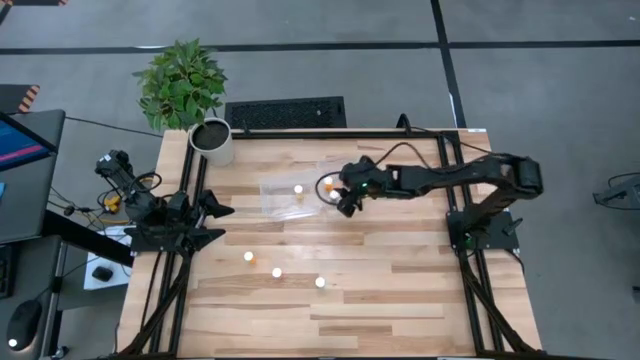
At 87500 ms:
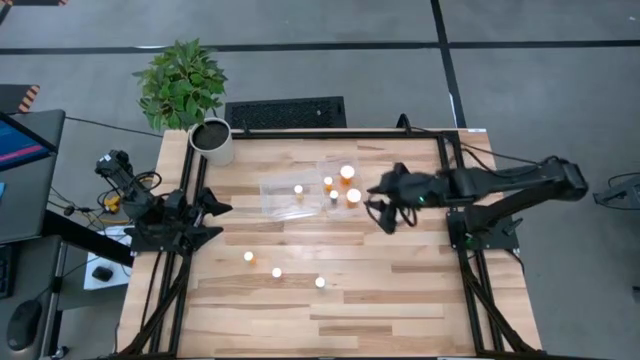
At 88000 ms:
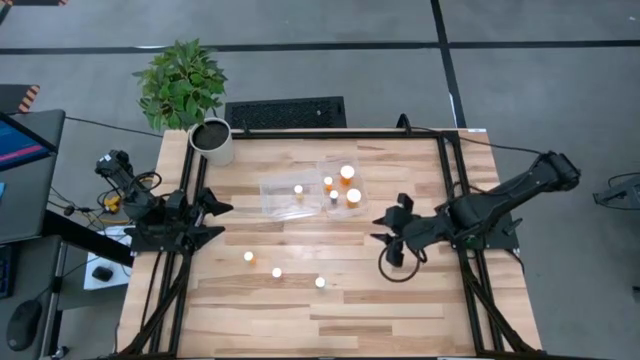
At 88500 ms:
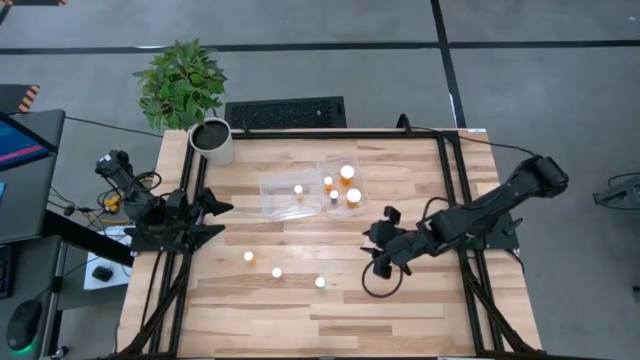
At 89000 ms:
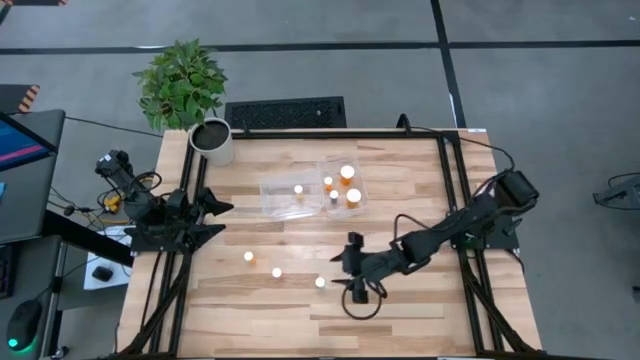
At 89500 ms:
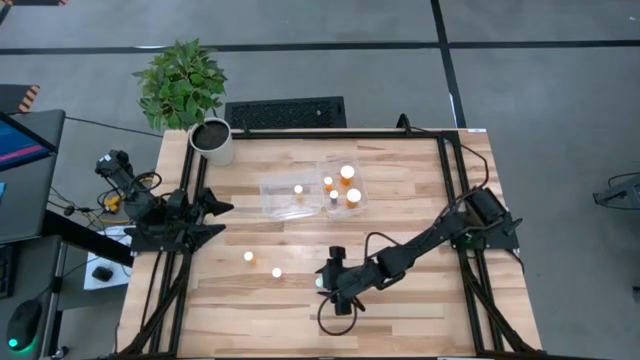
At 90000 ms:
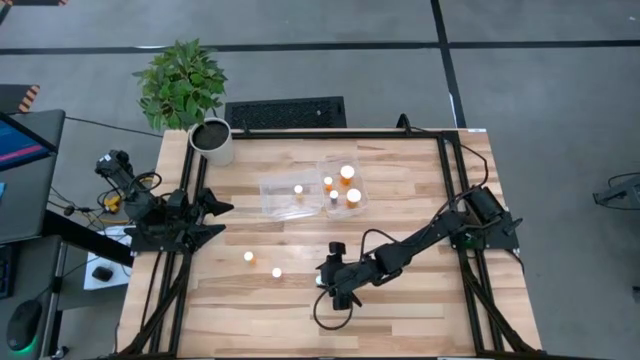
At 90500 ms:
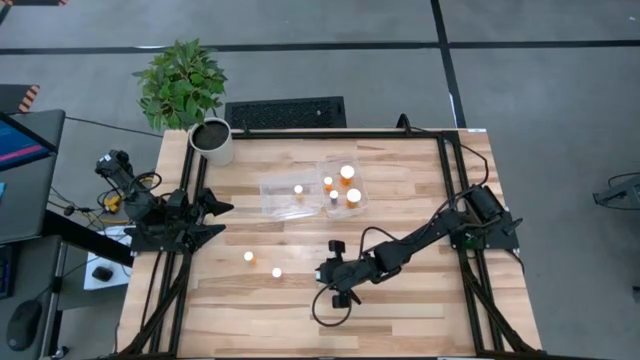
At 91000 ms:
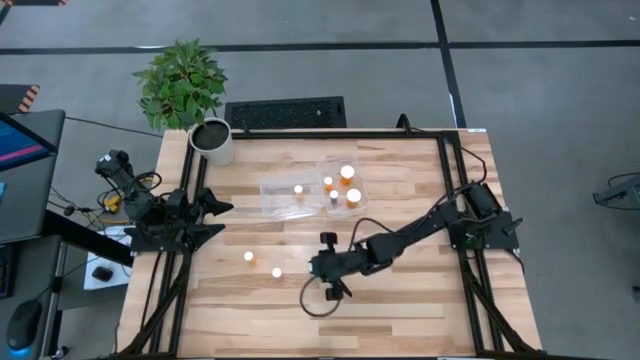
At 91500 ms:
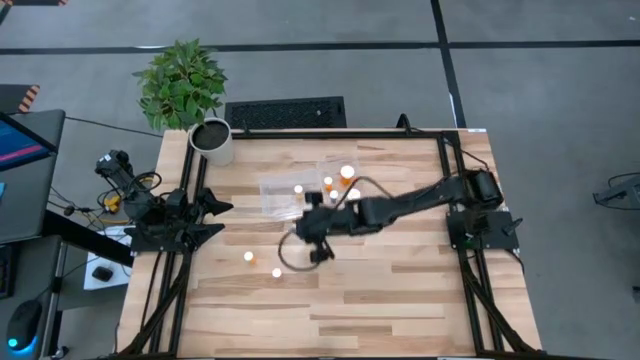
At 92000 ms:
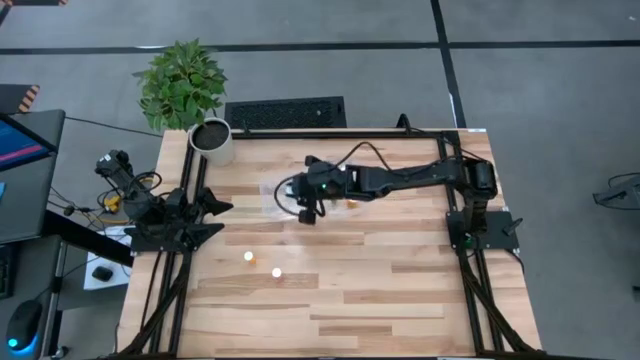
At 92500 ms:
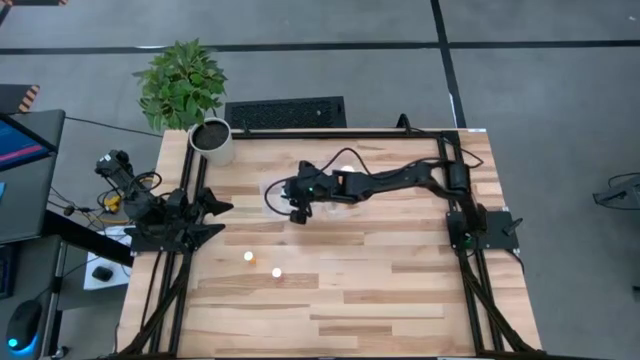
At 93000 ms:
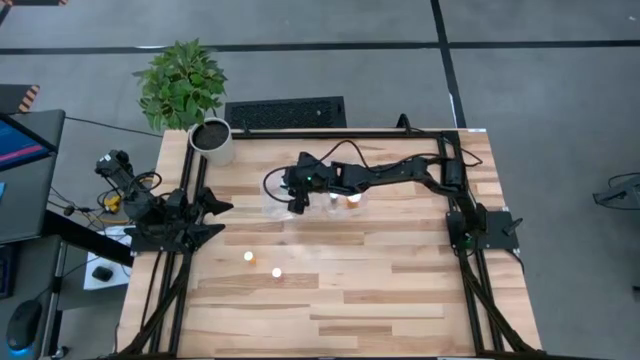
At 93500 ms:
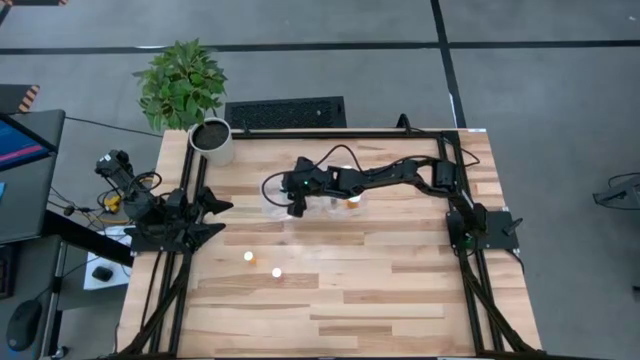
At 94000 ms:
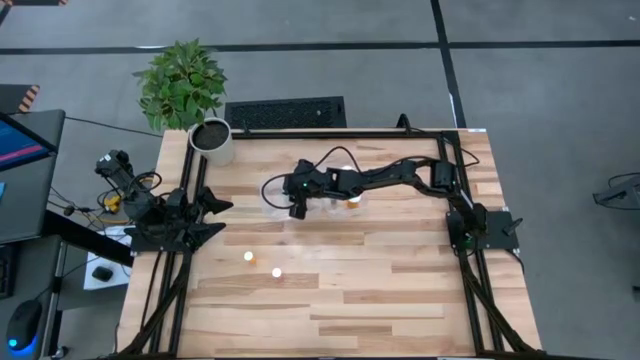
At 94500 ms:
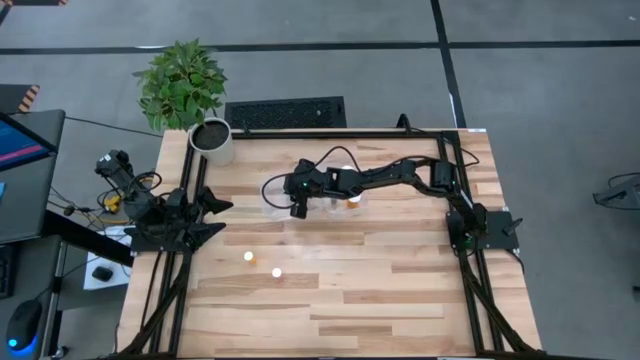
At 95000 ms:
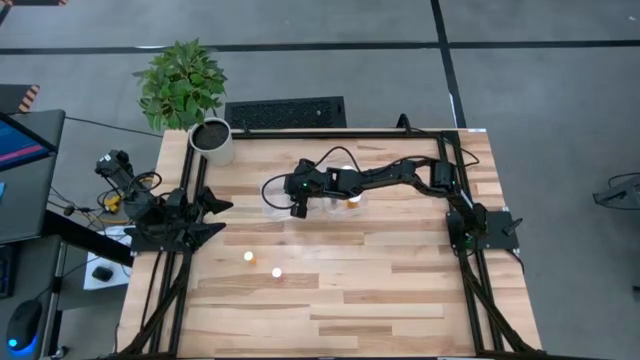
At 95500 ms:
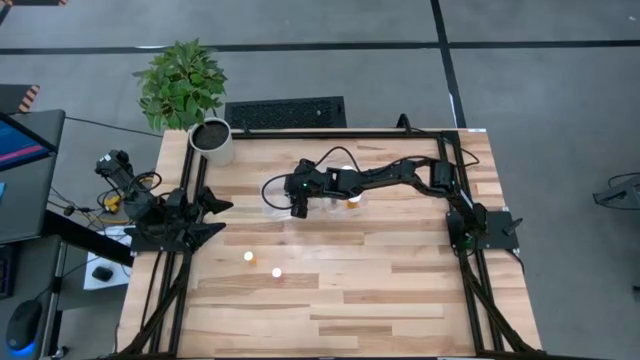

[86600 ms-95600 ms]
Task: Pick and place medicine bottles into bin by pill shape (circle, oval)
Put the green tablet bottle into the left transparent bin

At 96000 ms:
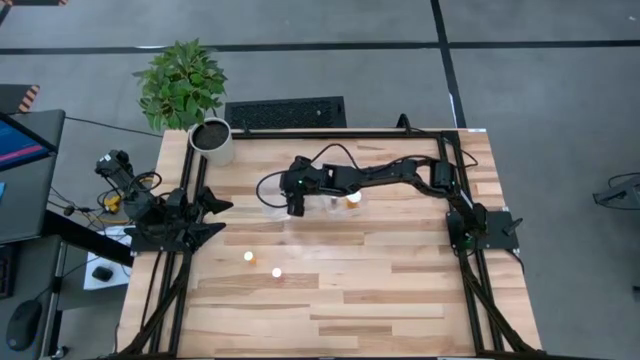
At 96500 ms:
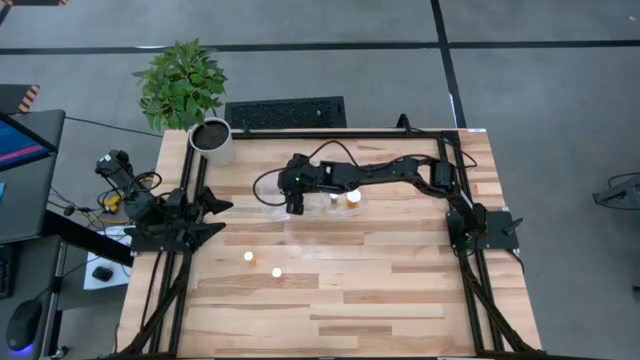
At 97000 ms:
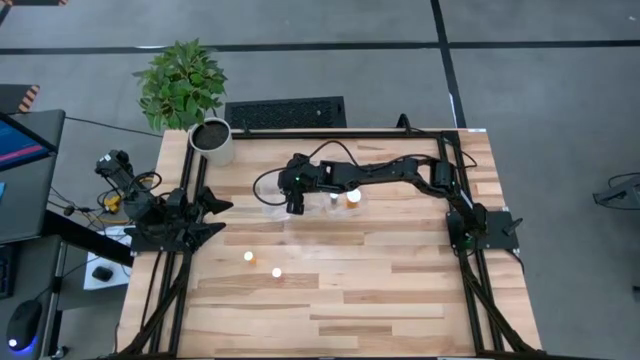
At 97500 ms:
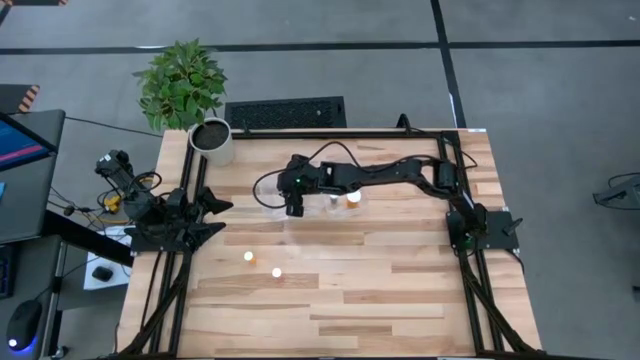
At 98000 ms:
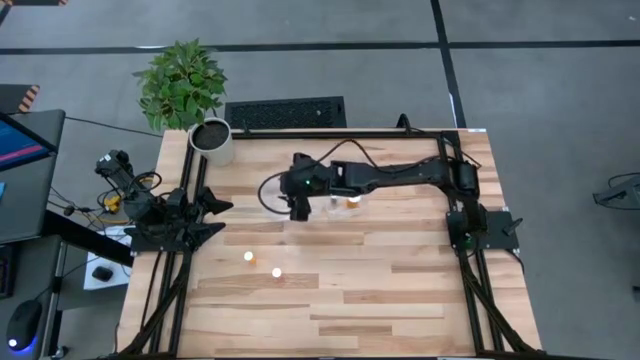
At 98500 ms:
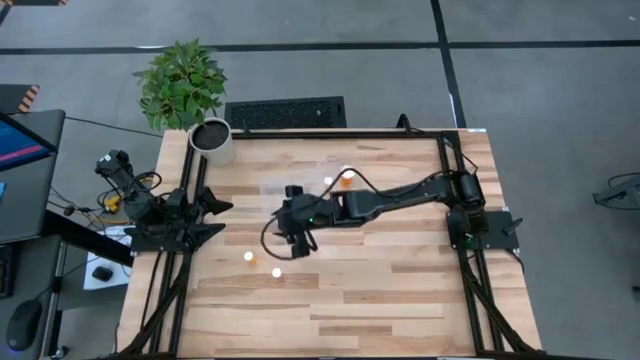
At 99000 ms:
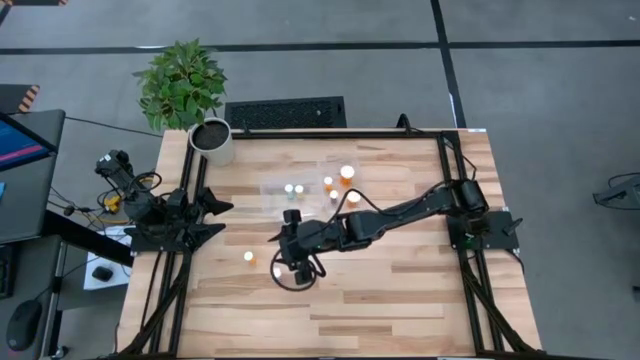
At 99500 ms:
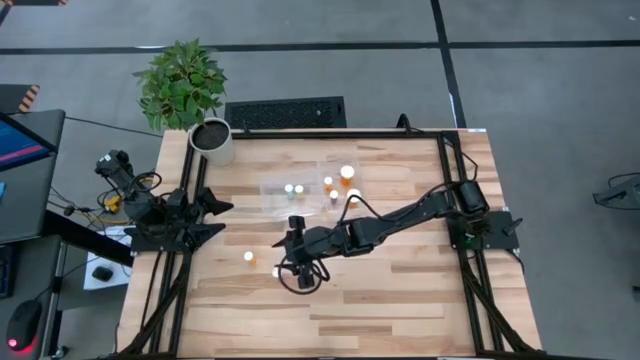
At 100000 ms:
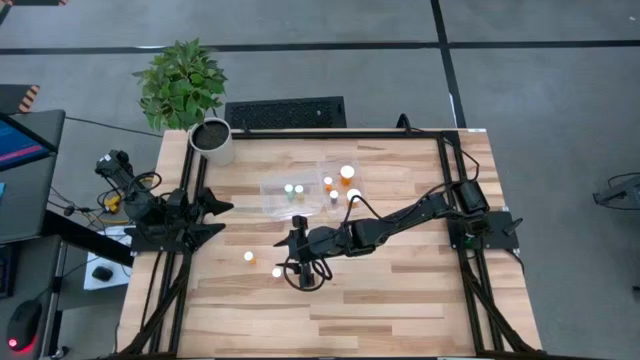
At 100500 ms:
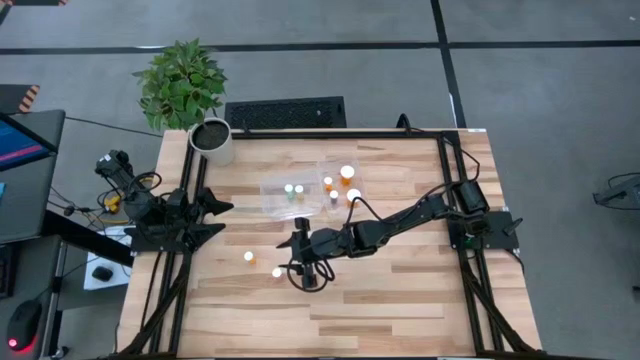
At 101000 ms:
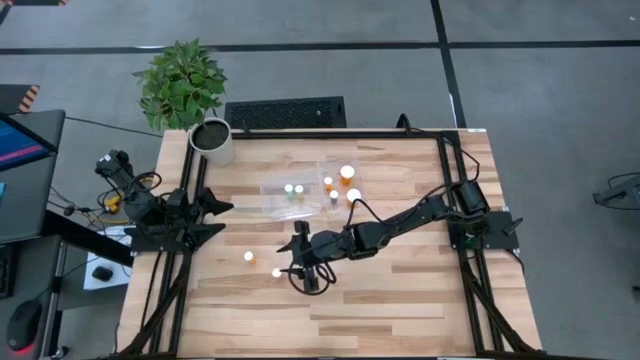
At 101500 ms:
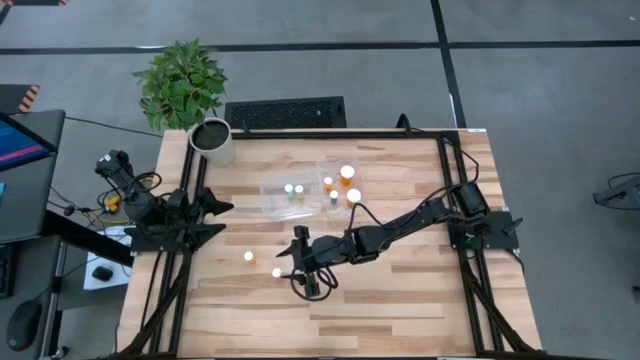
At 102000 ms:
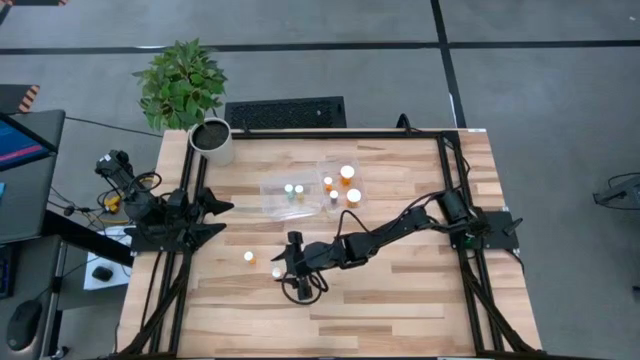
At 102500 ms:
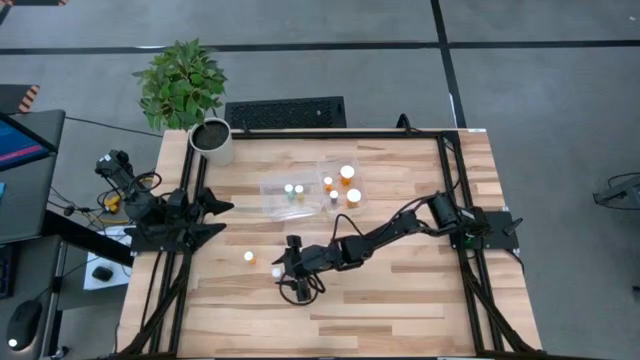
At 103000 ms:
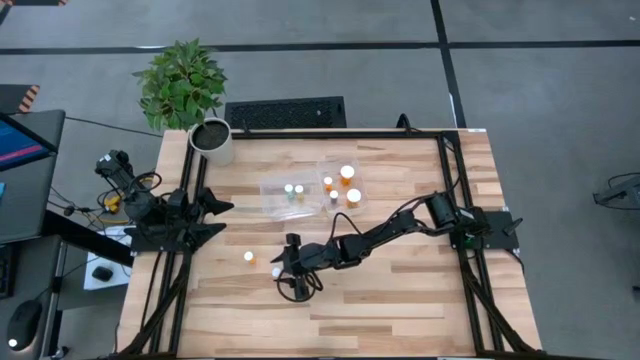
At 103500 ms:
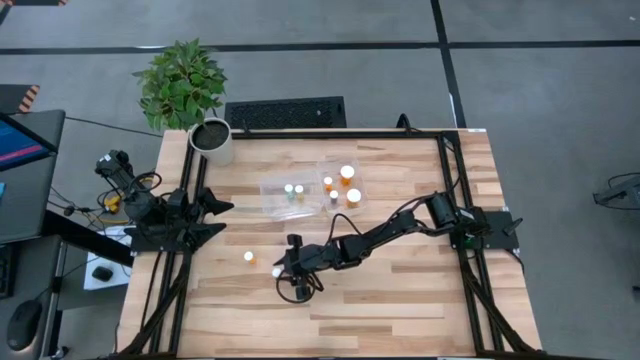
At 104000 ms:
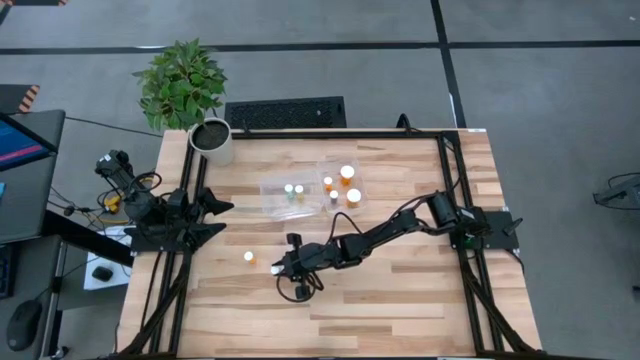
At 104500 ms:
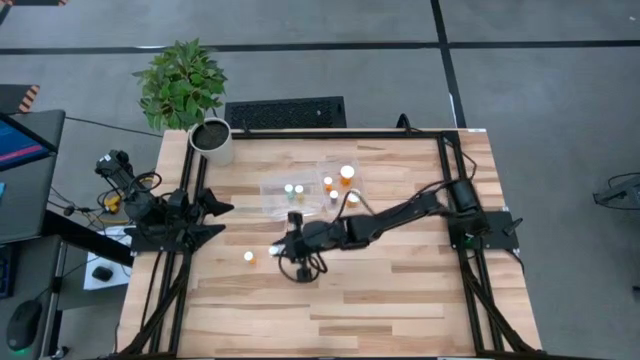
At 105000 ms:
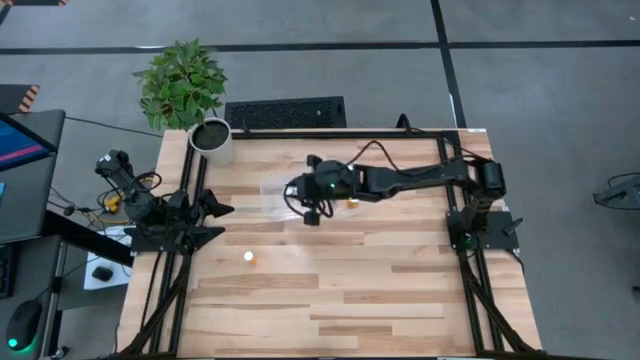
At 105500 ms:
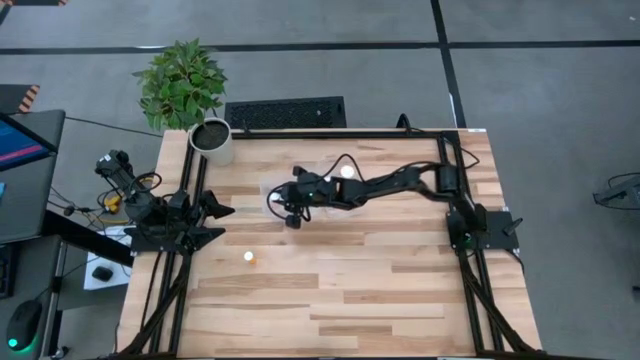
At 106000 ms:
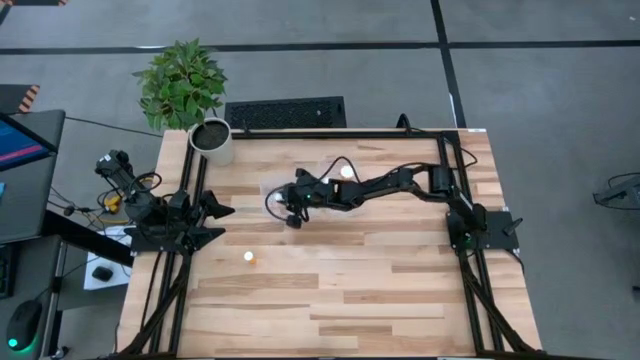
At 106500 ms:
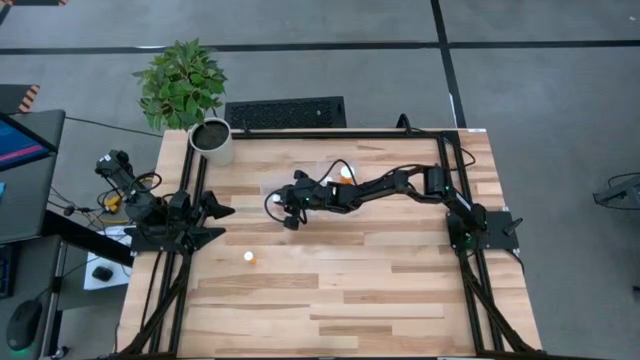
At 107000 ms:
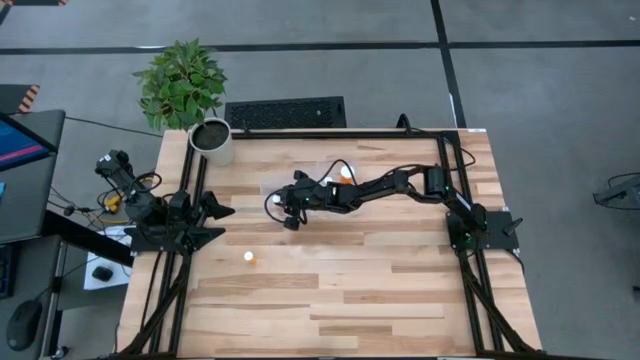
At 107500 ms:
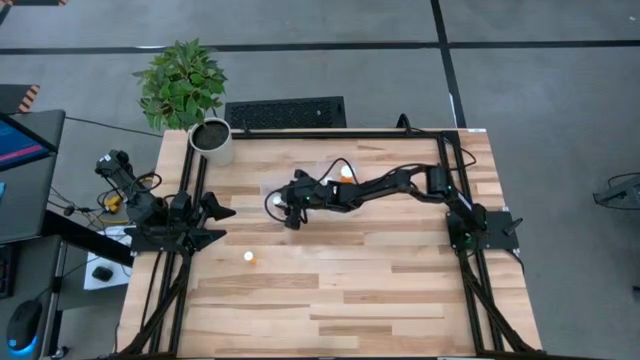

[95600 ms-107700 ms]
Put the pink tablet bottle into the left transparent bin
